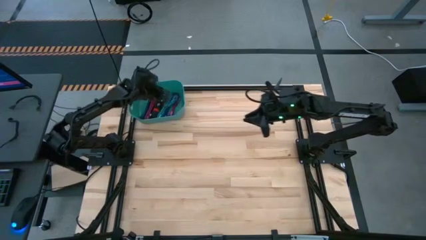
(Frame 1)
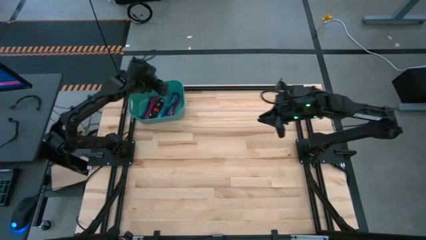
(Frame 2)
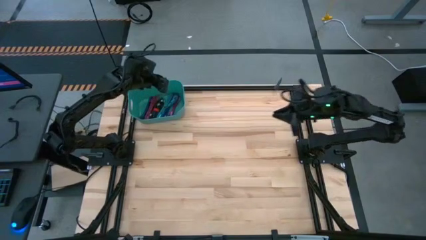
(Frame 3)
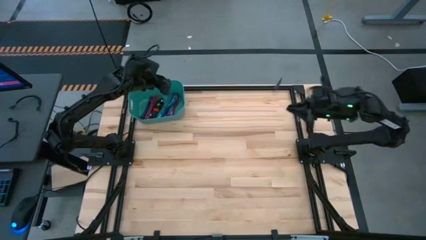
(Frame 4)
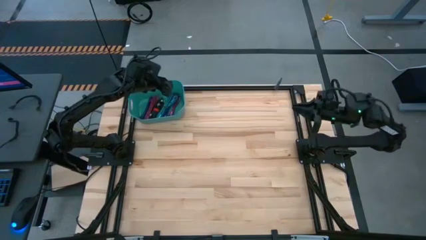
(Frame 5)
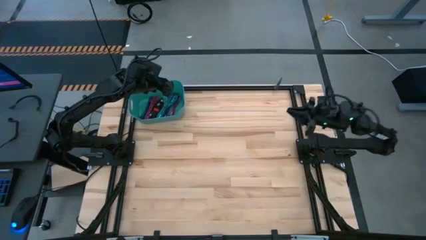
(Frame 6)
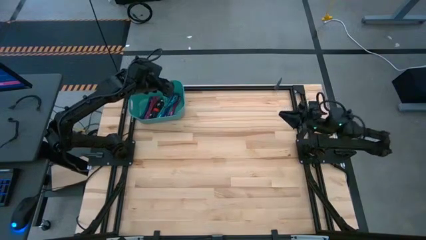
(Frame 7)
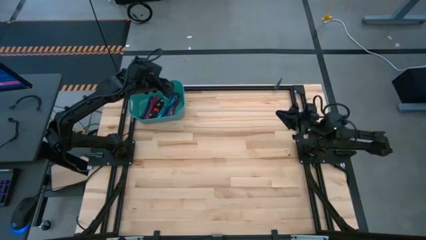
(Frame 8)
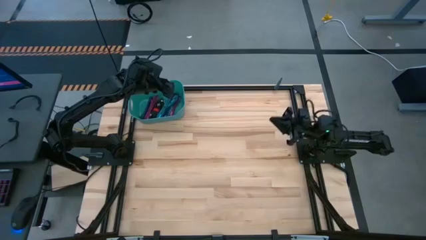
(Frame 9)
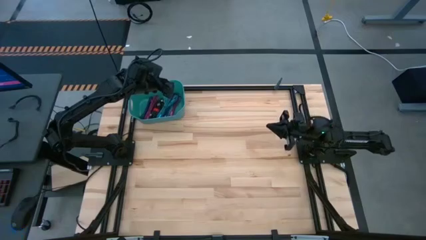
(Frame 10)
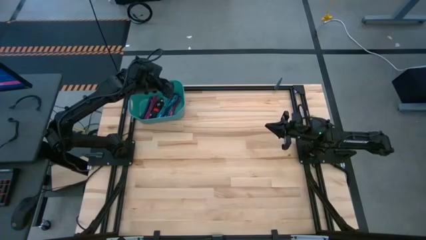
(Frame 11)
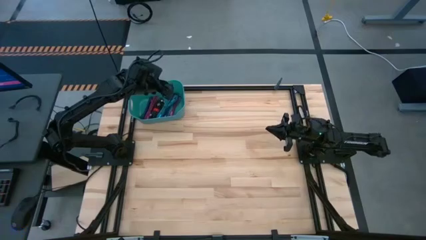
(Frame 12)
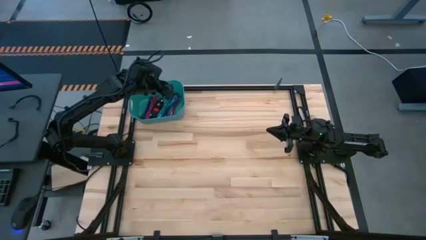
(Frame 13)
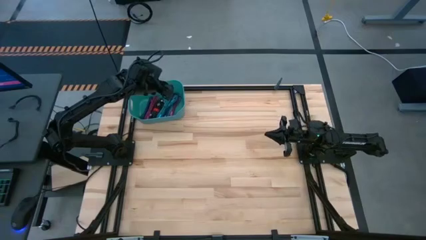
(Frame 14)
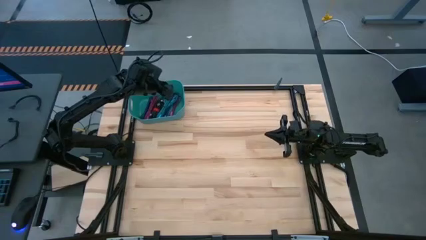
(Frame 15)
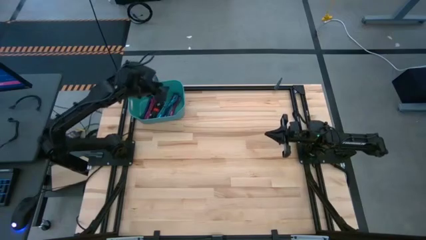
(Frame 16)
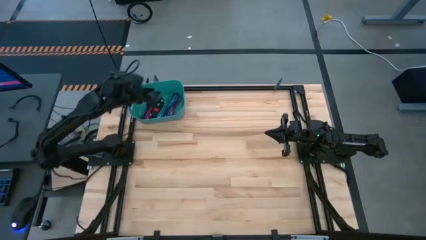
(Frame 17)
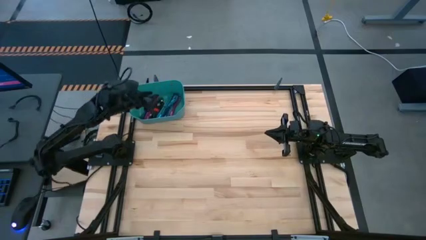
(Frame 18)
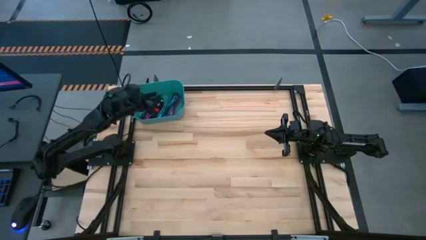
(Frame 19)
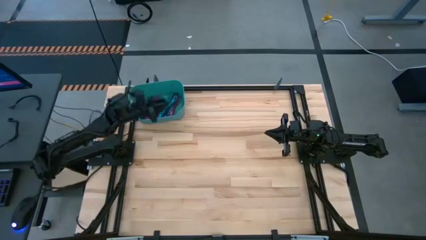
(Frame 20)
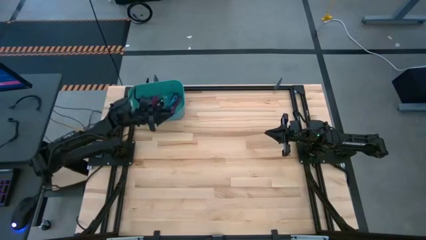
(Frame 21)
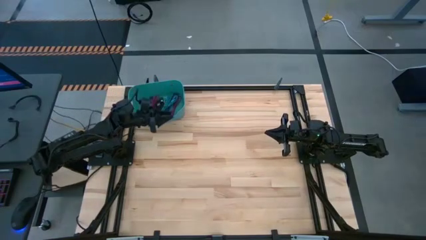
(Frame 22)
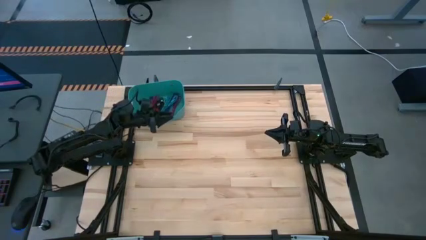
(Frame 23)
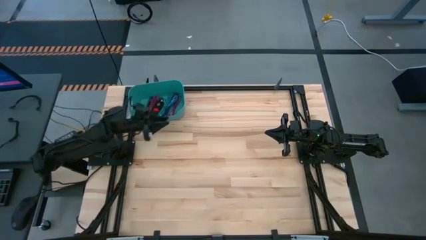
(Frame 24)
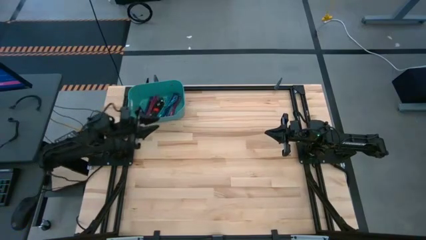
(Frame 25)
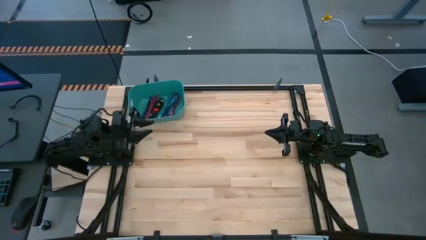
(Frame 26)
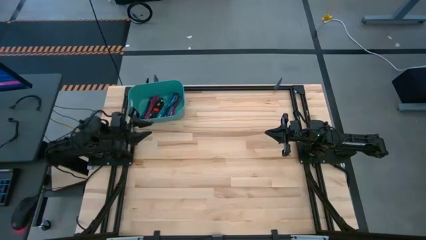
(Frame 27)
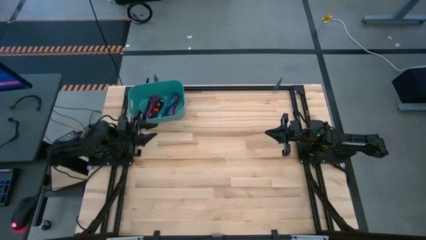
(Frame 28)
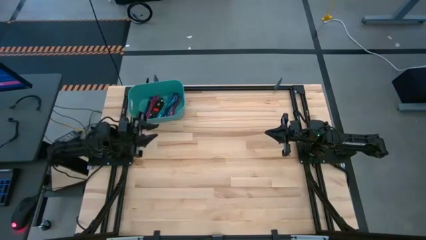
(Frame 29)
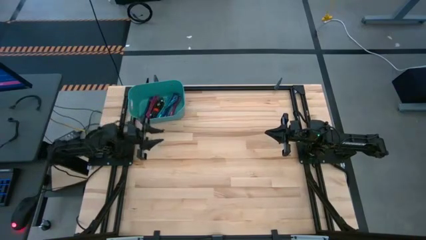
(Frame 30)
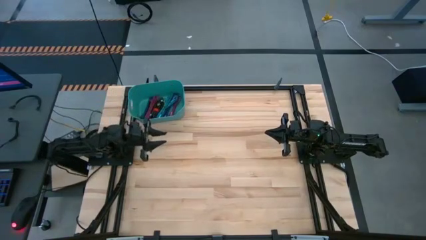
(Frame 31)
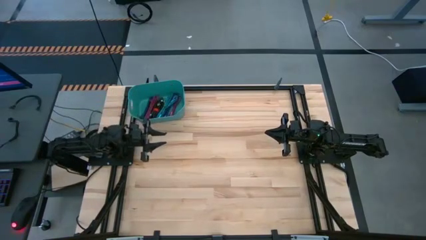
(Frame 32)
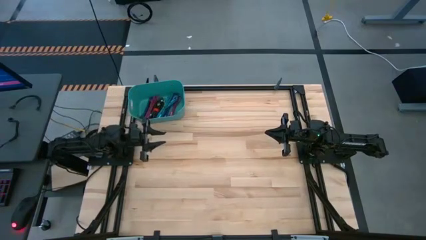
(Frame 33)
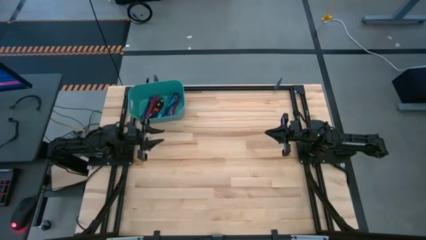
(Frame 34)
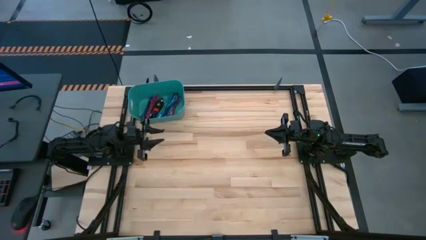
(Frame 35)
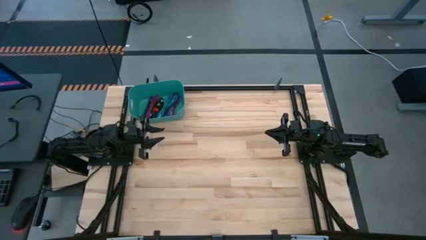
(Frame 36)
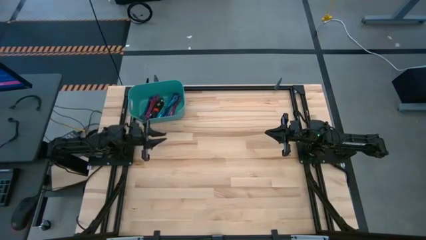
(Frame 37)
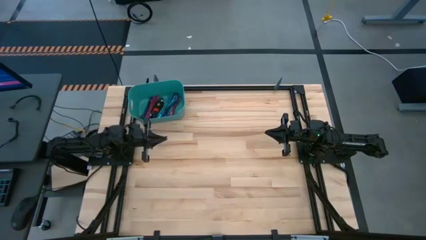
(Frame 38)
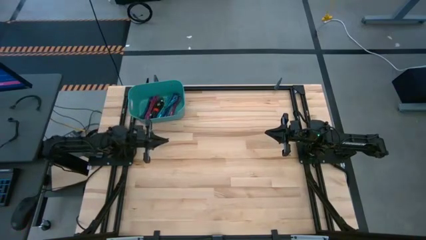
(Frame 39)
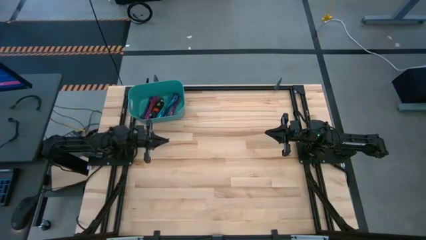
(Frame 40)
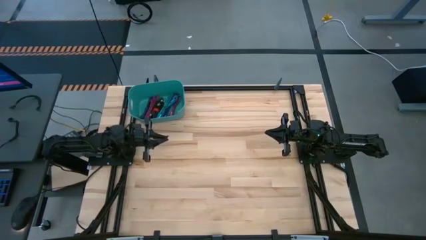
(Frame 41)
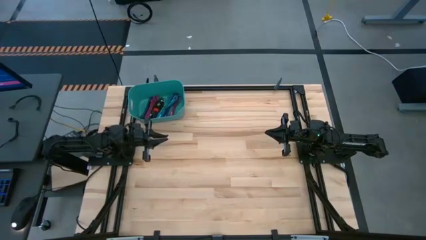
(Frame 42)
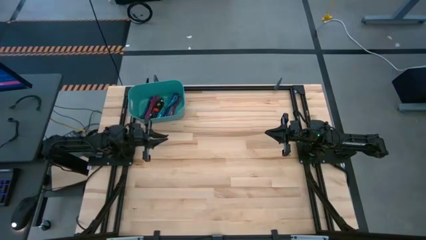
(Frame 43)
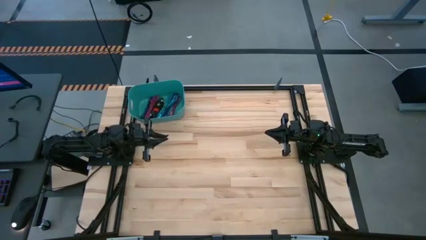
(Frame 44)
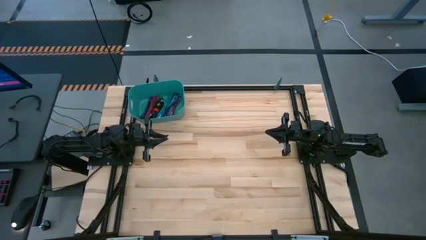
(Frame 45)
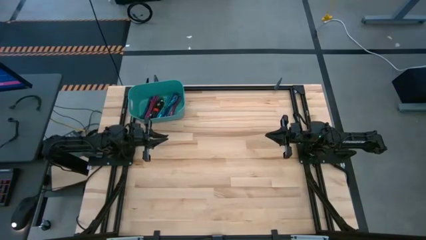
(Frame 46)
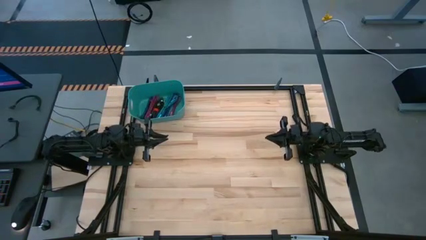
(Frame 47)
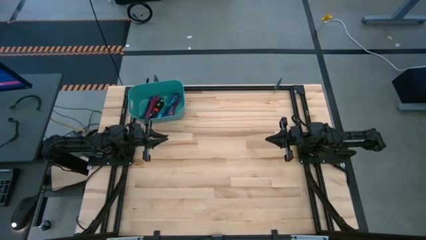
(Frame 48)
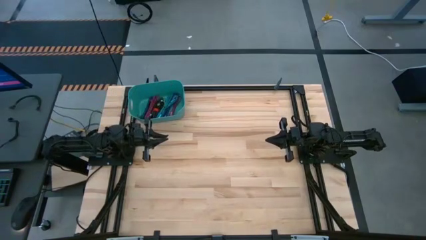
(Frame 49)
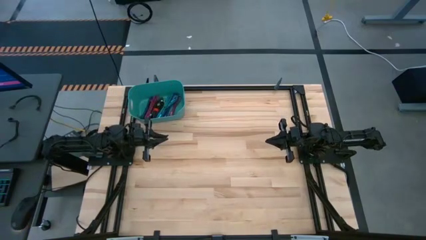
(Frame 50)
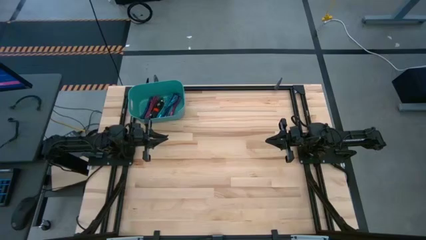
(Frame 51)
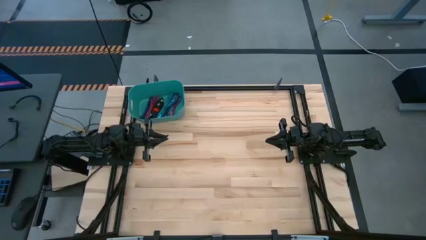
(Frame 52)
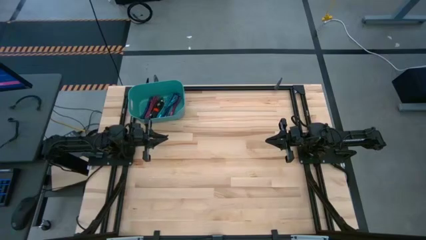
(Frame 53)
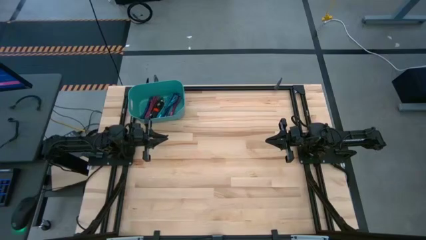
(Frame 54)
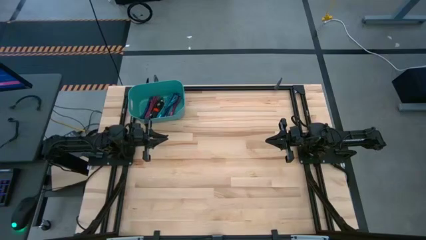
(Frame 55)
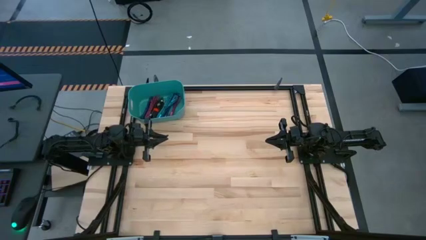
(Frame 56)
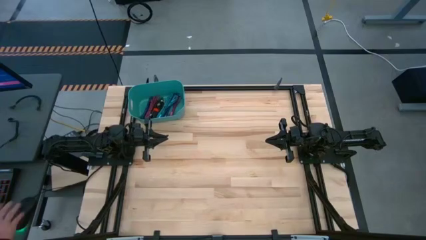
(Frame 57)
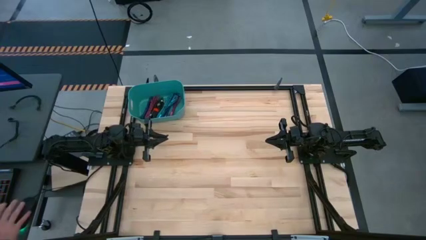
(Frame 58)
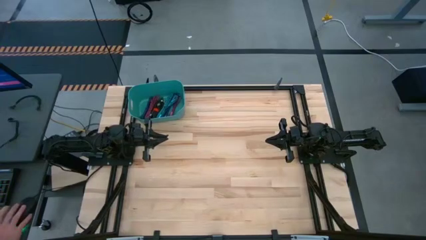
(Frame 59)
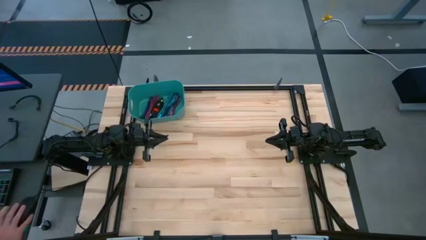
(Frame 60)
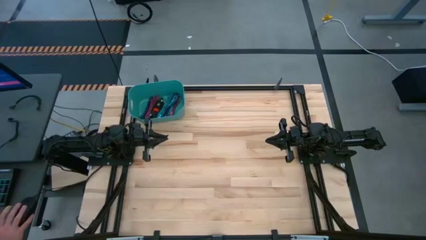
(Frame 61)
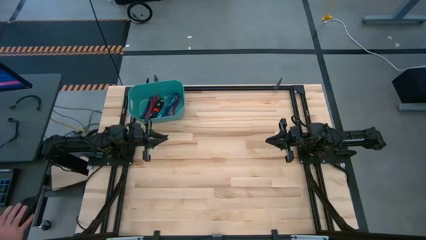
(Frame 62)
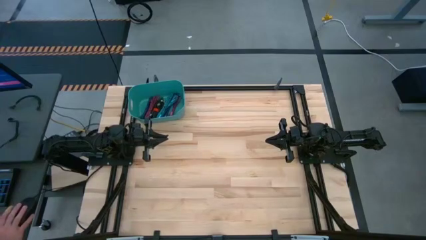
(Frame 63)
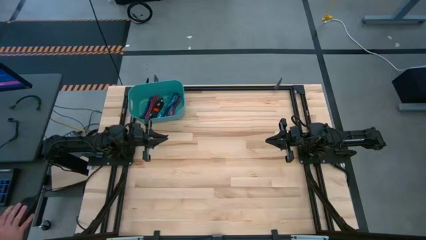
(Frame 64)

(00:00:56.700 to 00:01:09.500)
Task: Pick and place USB-C Cables
Return to Home Position

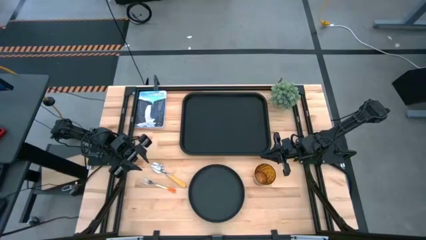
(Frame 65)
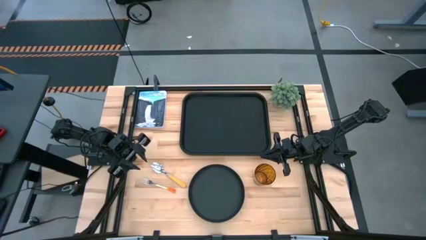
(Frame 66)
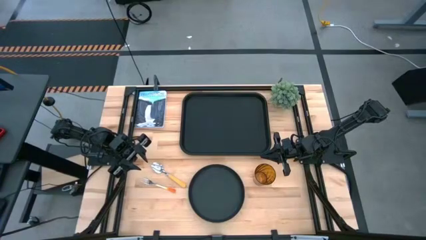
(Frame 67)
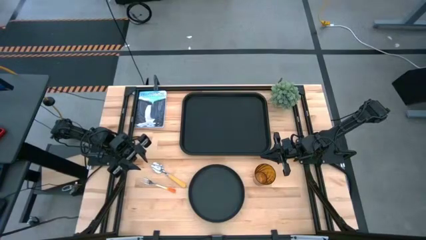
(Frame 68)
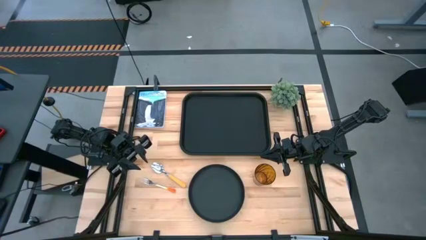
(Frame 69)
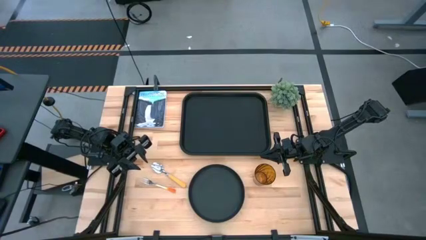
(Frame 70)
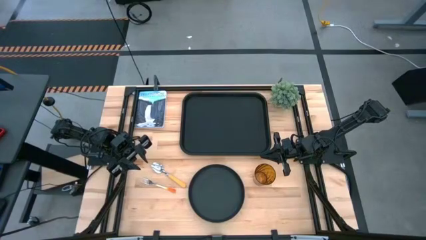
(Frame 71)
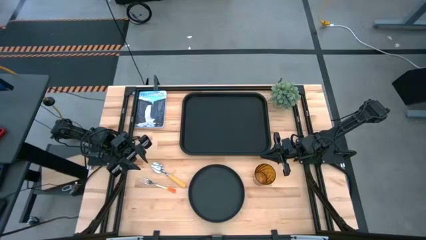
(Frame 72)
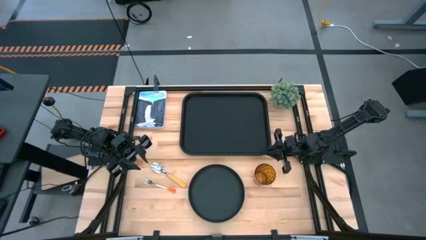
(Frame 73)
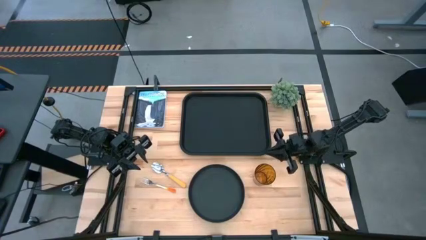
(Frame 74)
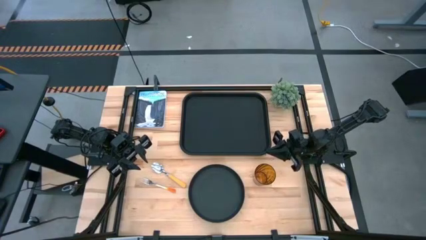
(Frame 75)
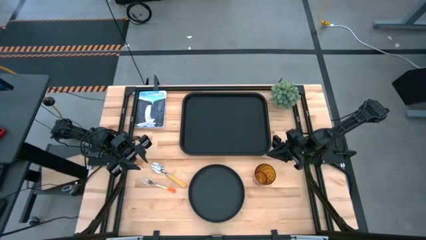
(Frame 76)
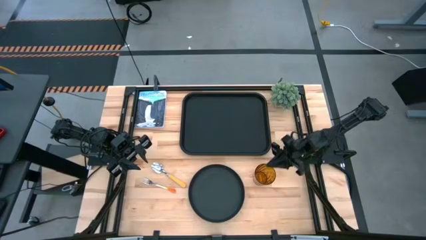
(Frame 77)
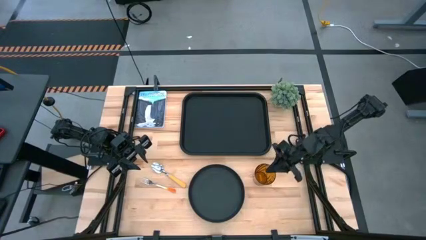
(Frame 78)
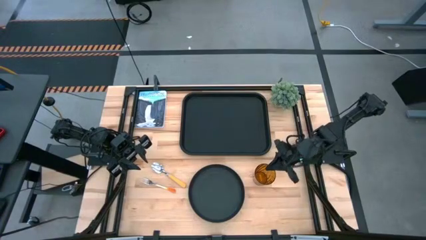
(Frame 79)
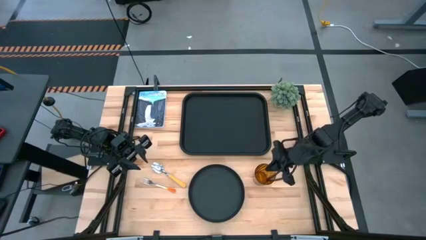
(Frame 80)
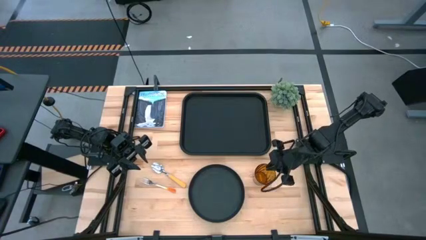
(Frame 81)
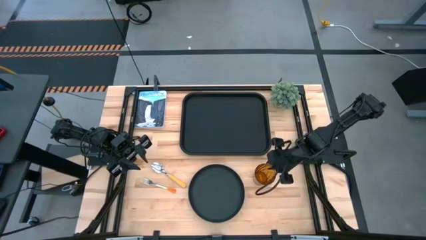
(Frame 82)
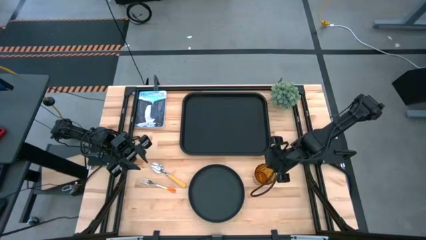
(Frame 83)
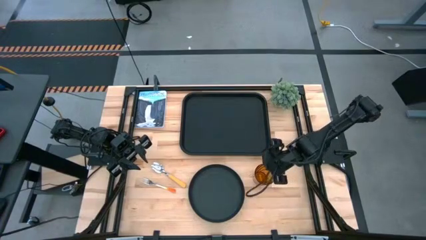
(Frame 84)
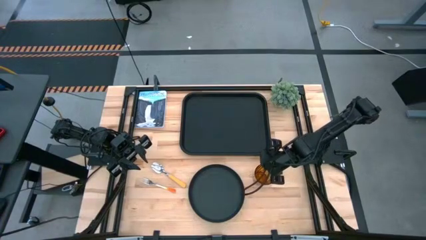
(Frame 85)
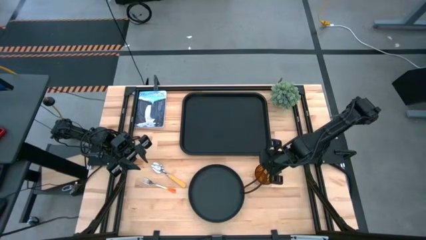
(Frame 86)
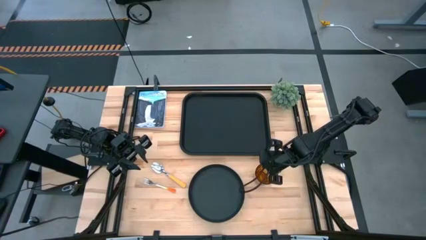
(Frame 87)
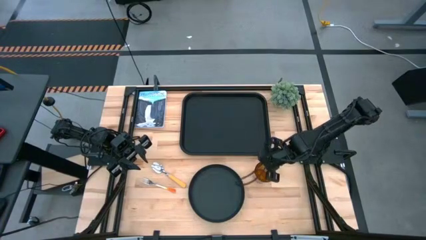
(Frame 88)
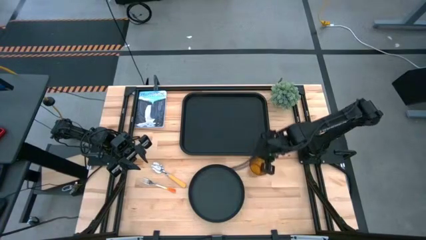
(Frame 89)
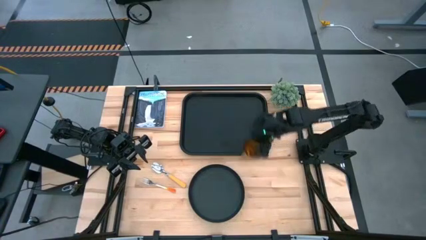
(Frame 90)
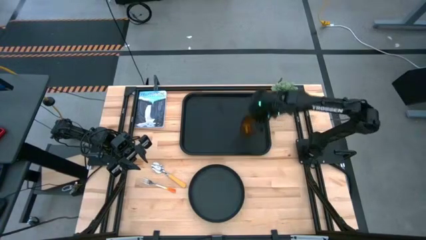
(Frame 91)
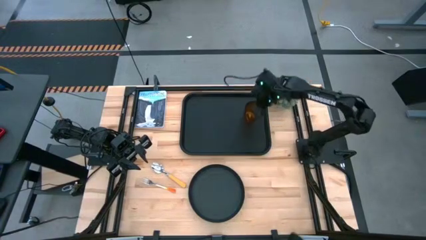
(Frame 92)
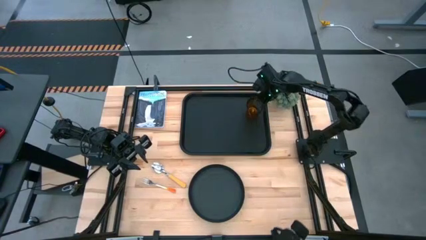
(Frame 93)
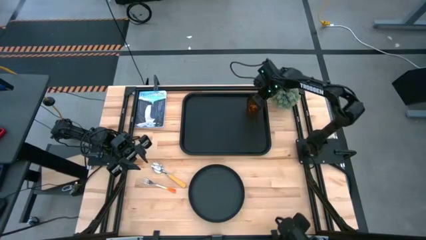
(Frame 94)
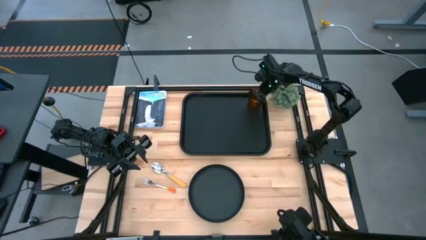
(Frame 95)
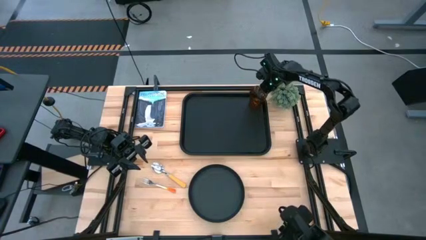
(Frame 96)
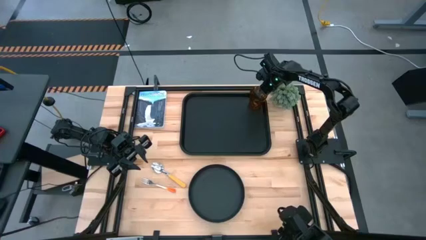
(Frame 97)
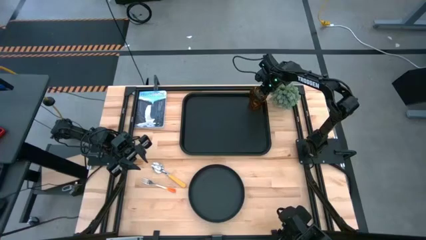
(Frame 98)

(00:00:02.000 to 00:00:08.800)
Task: Pick and place plate/cup/fork/spoon on tray
Put the brown cup on the black tray
